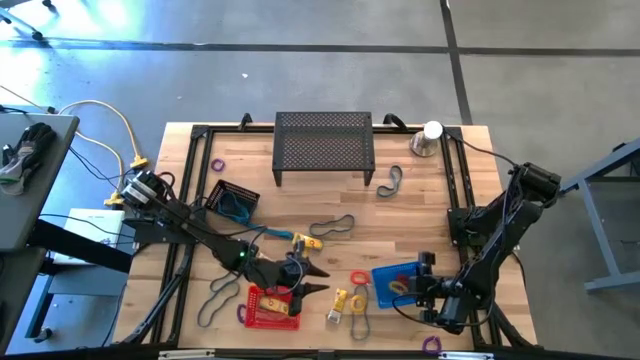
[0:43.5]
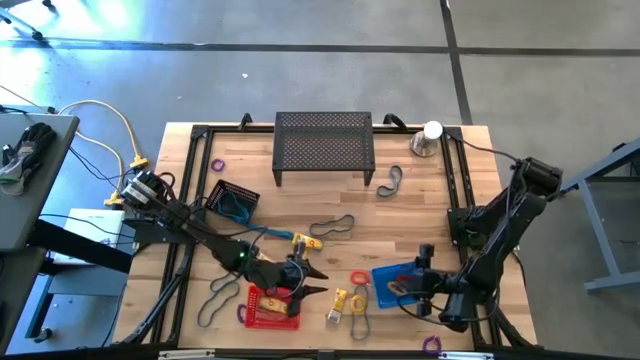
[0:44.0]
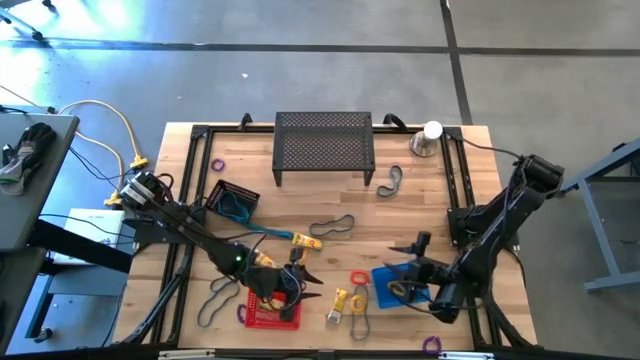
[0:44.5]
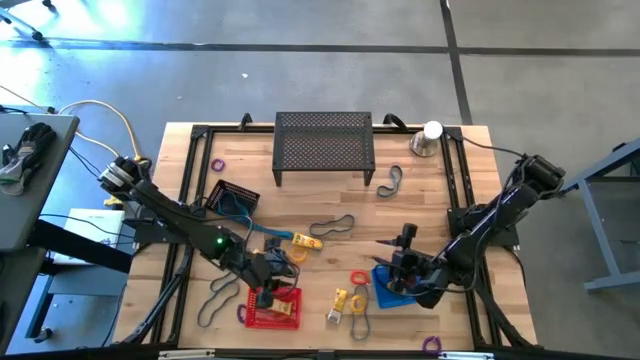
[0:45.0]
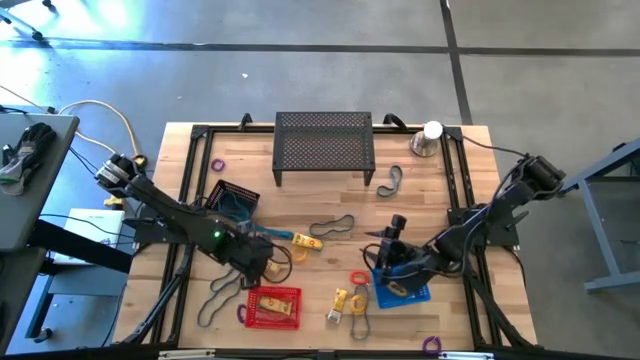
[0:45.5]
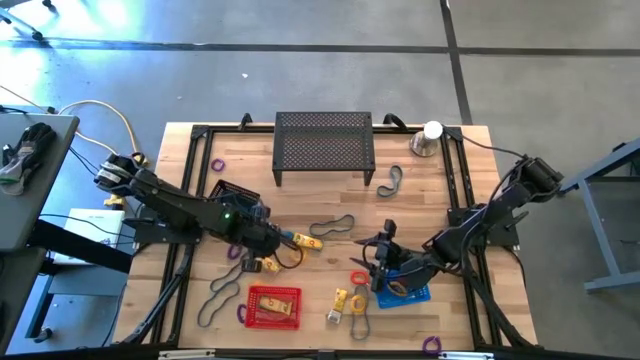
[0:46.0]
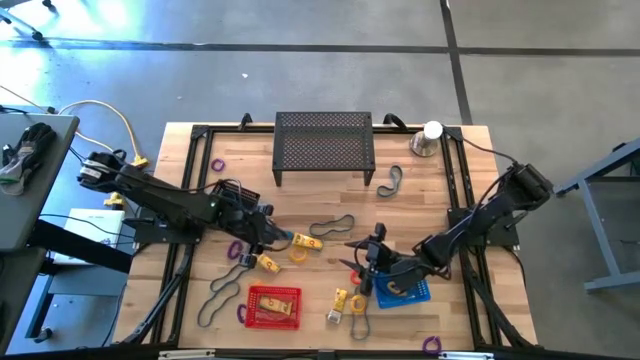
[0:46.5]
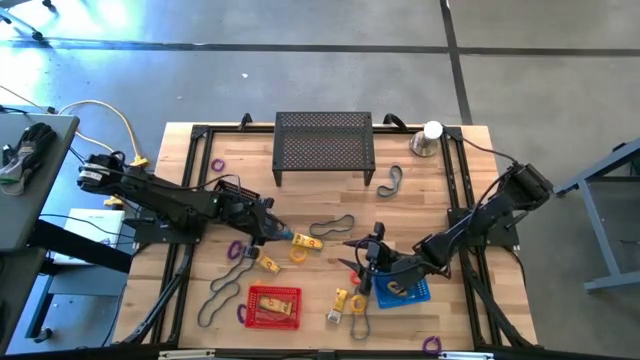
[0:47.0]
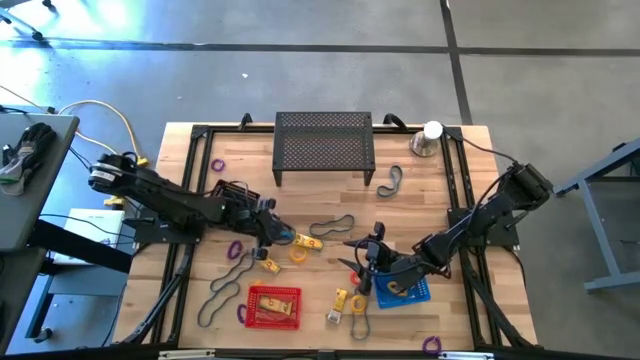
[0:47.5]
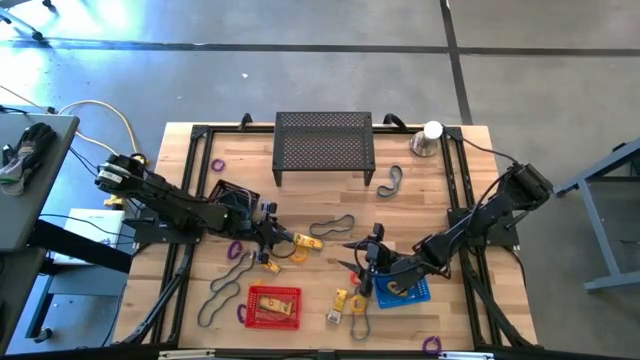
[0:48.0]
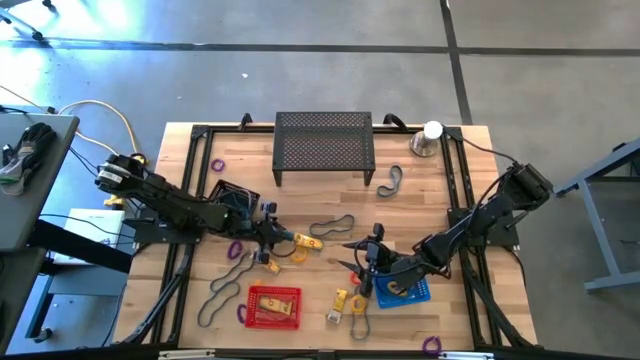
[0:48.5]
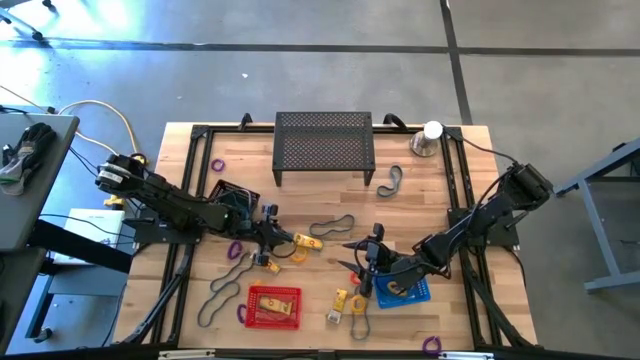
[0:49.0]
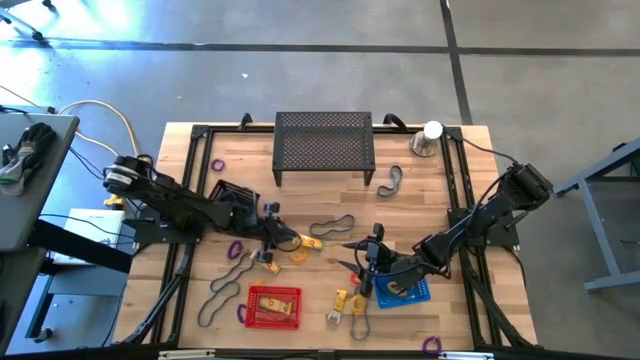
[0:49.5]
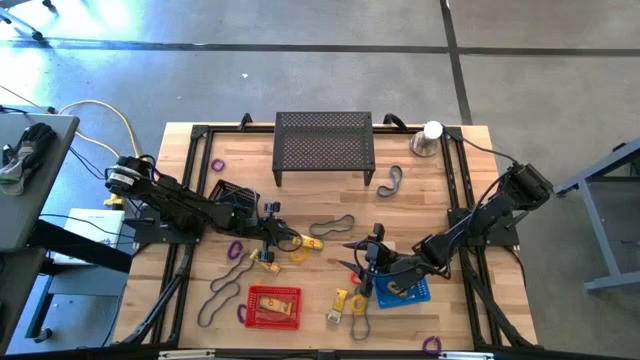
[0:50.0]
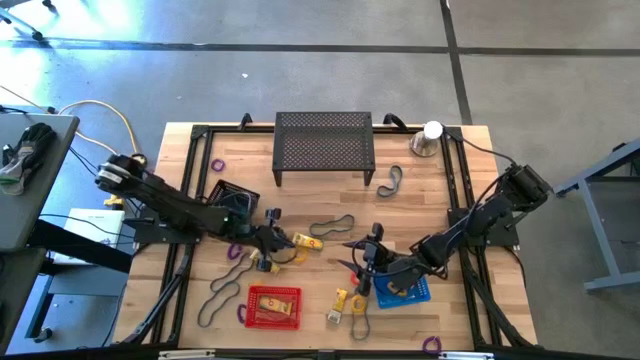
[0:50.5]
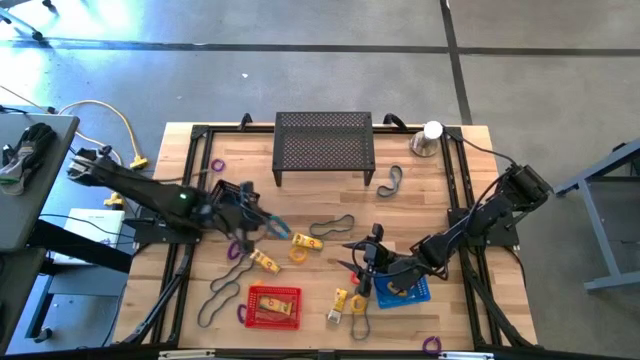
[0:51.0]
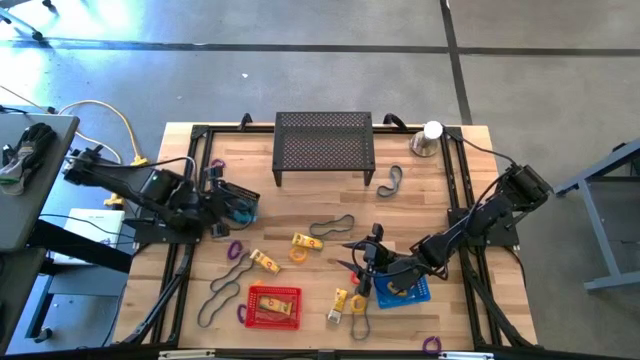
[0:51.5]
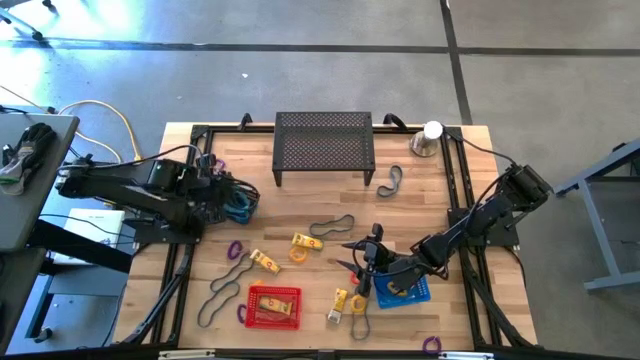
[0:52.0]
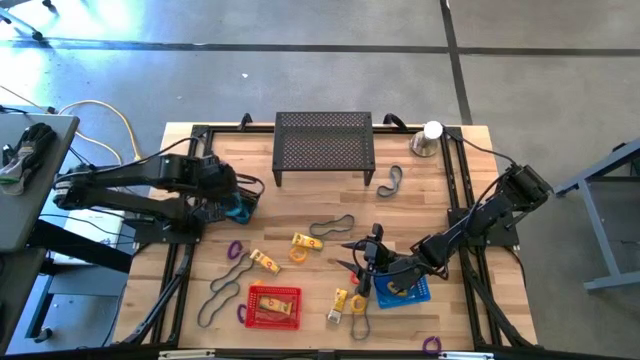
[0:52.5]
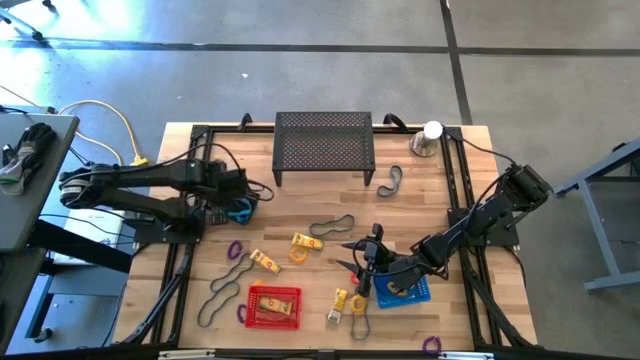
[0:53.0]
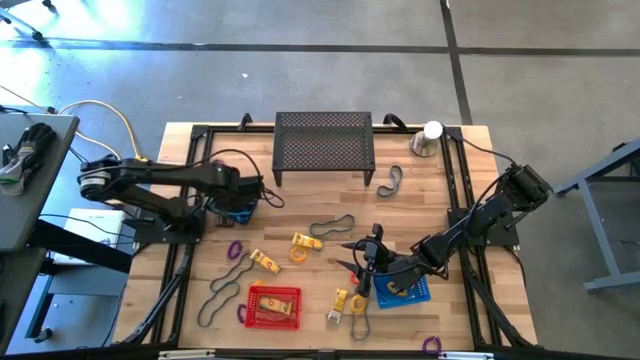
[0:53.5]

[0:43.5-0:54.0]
Task: Pick & Place Office Desk Supplies
Put the blue rubber band into the black bin

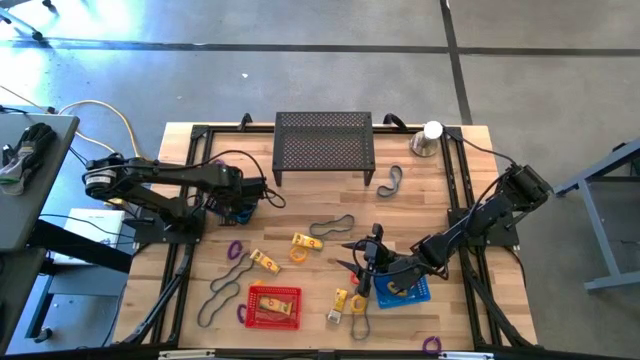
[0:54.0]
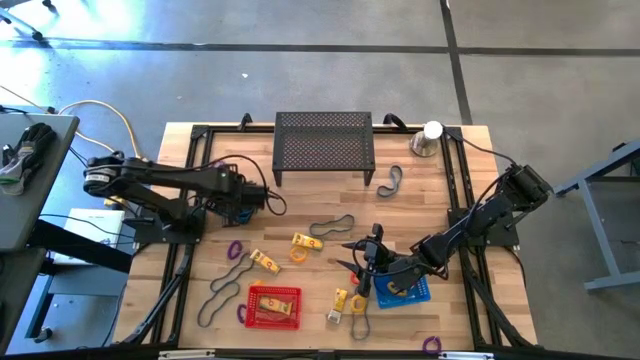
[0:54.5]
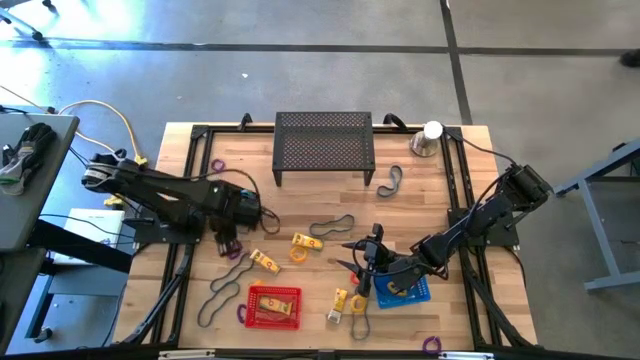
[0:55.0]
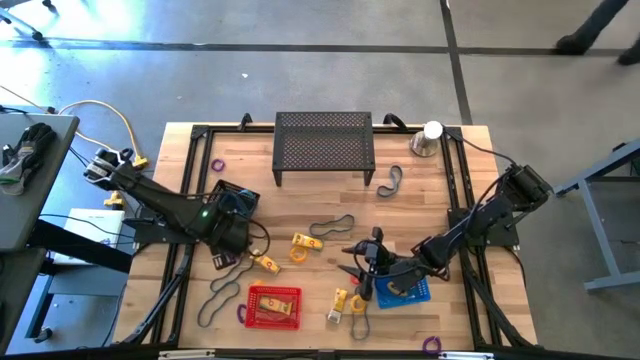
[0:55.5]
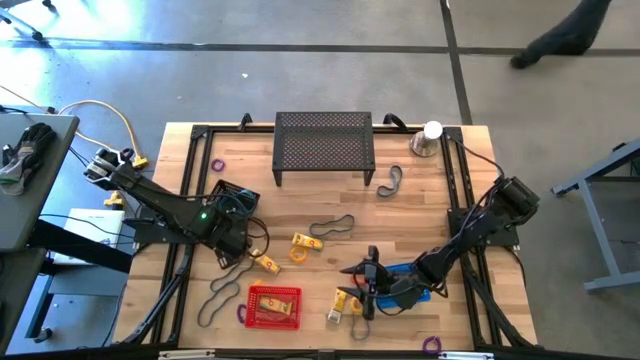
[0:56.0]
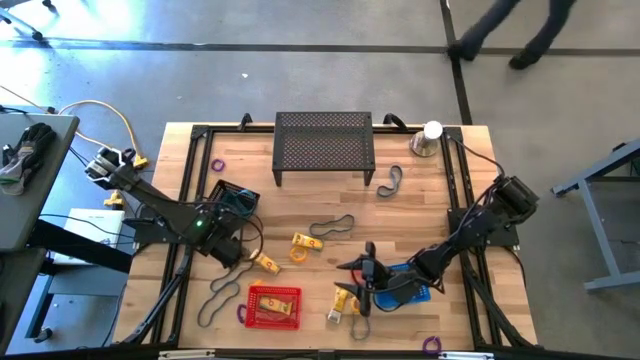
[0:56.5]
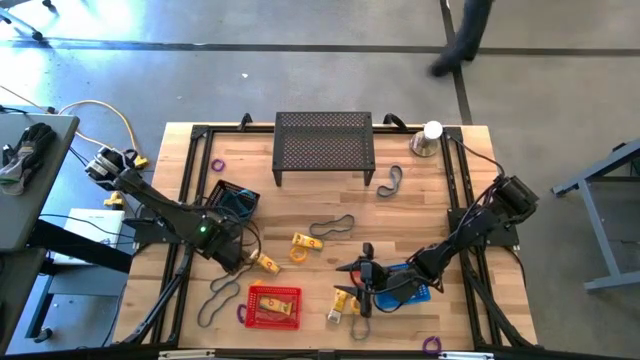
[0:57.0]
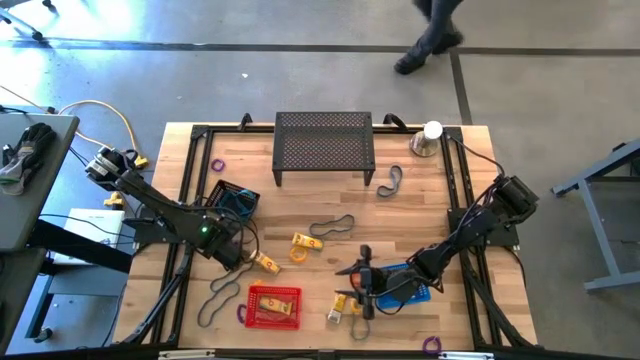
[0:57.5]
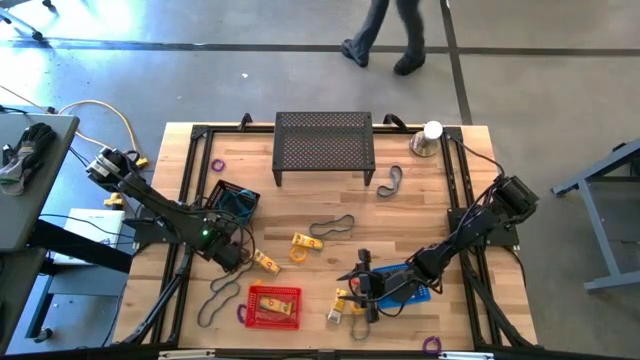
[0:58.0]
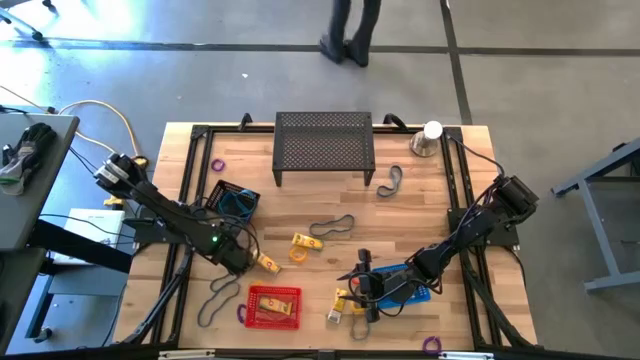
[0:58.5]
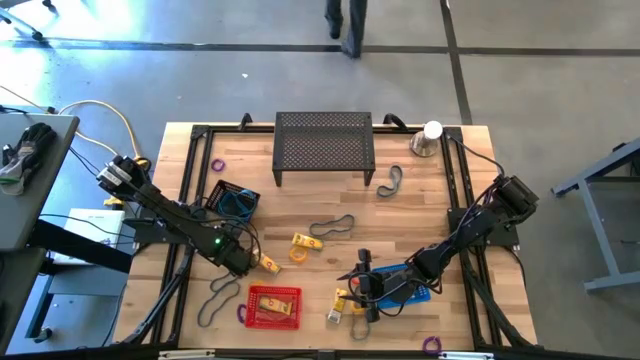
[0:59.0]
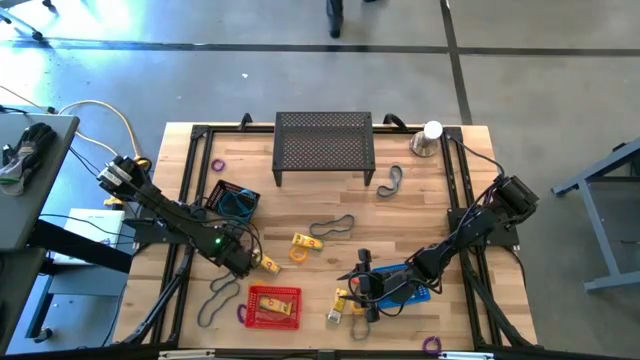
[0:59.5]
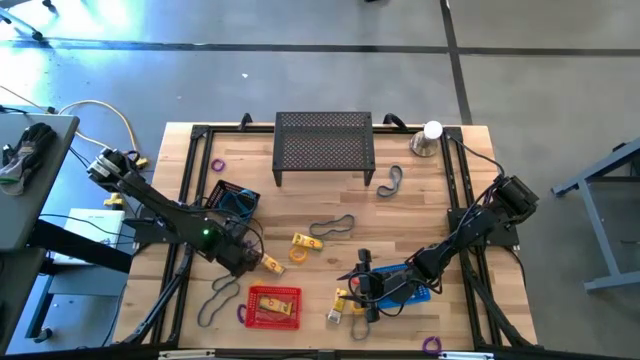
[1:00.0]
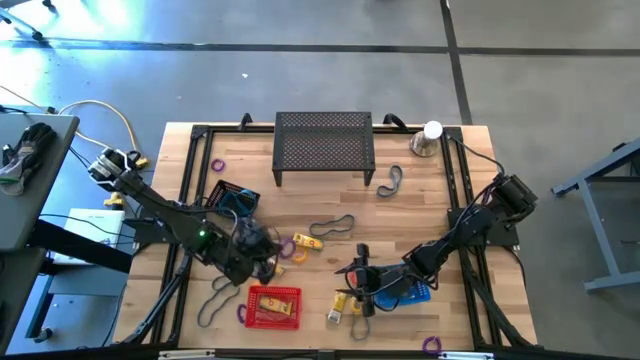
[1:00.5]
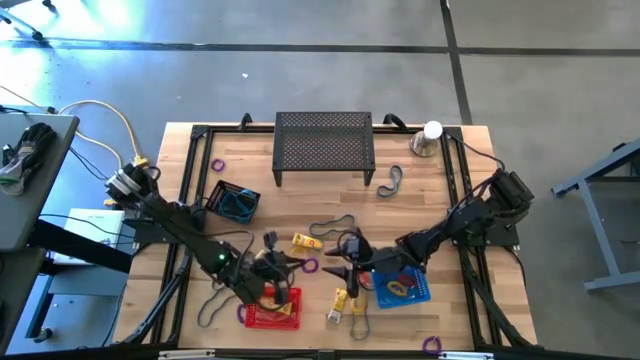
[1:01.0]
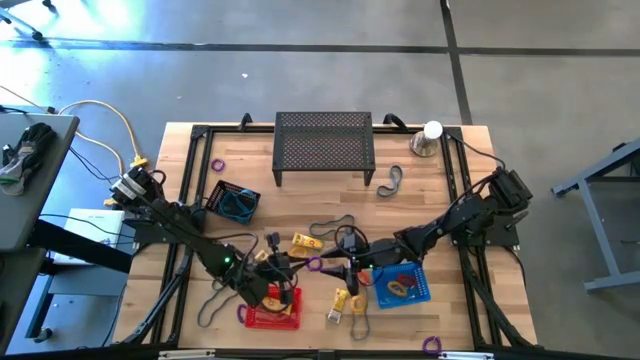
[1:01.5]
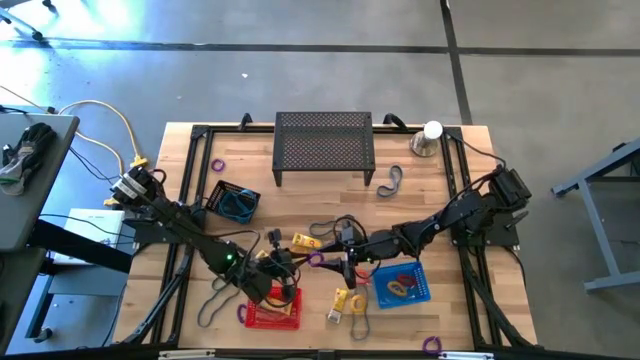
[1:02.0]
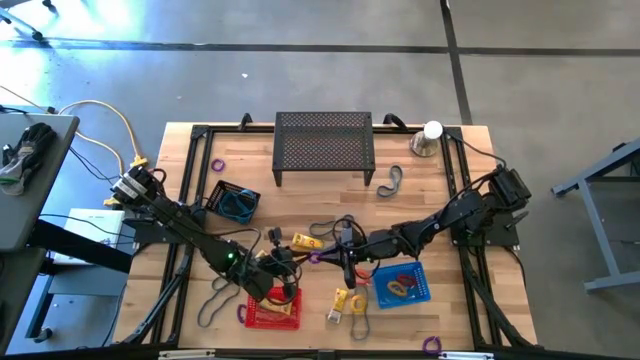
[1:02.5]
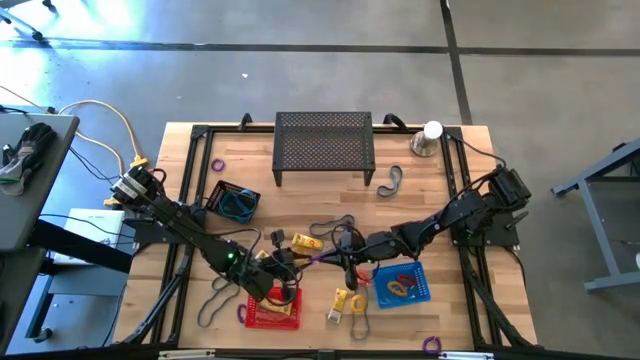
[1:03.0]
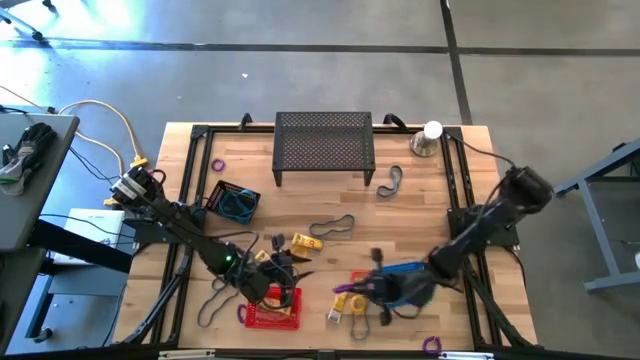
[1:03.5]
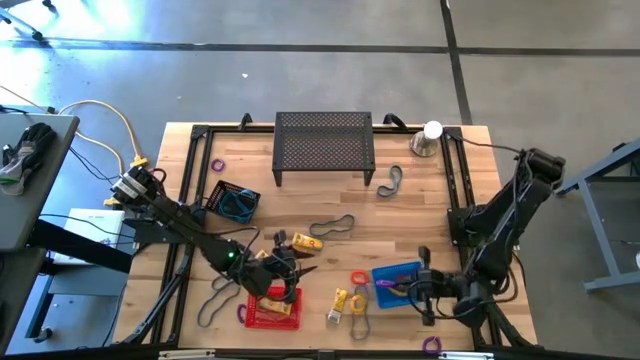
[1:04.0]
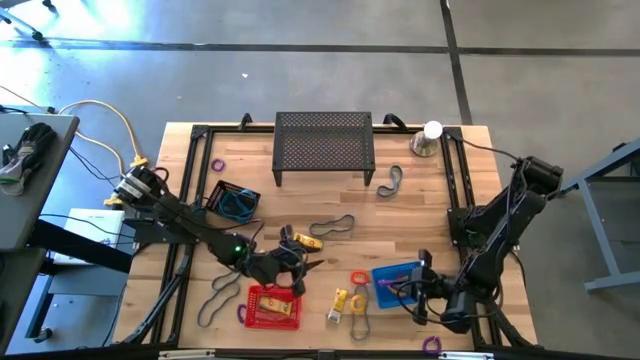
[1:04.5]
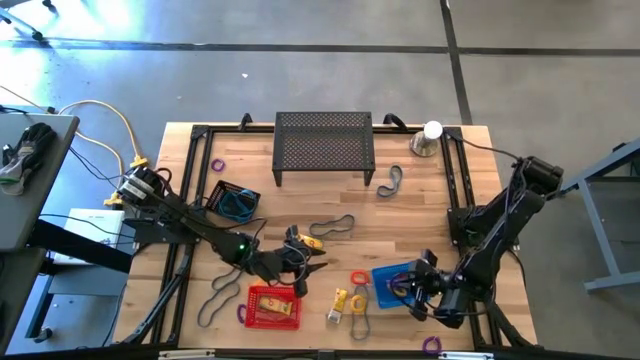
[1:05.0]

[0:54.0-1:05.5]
Put the violet spring keychain into the blue bin

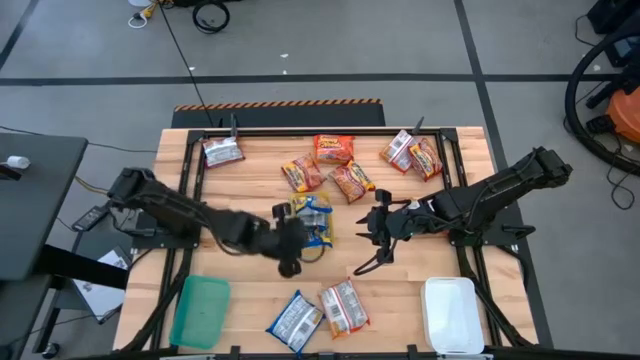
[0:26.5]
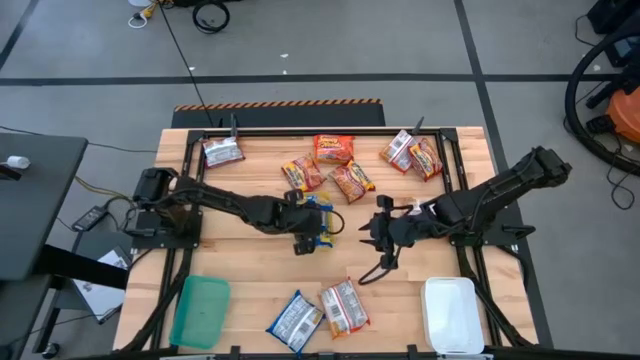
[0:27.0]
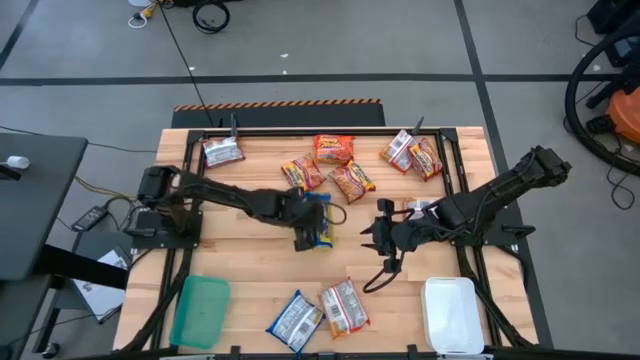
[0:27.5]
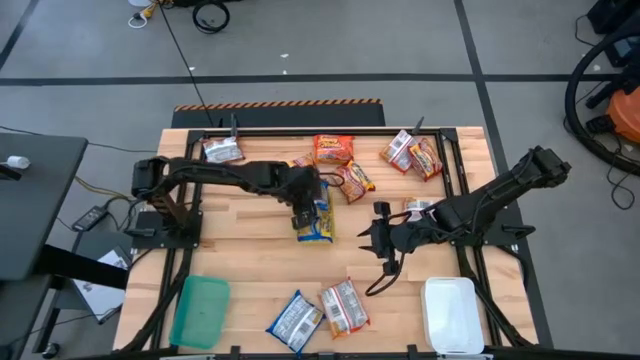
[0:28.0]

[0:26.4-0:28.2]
Task: Sort Maruchan noodles
Adjust the blue noodle pack in the yellow bin
